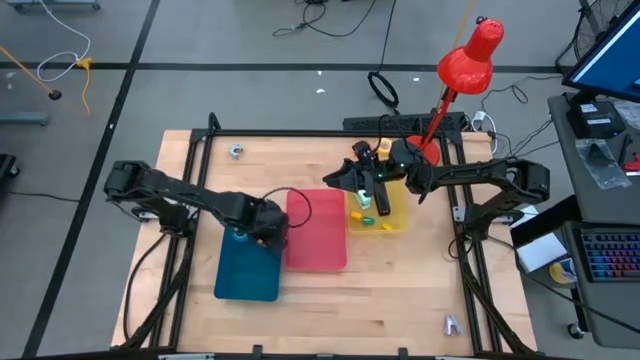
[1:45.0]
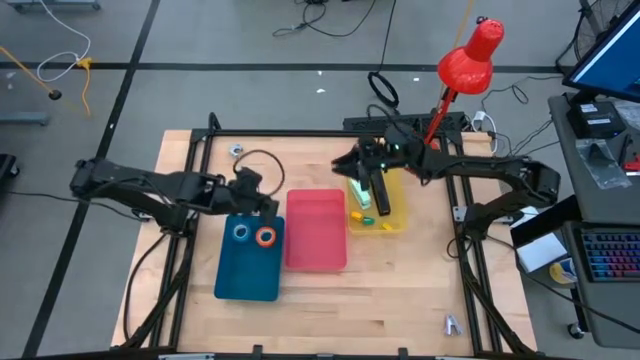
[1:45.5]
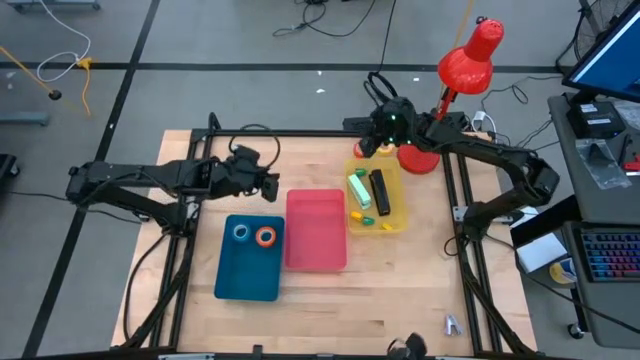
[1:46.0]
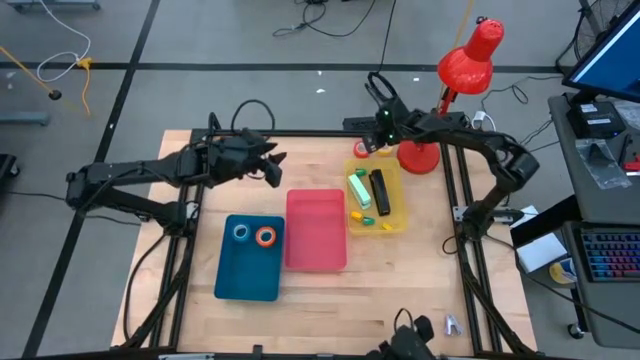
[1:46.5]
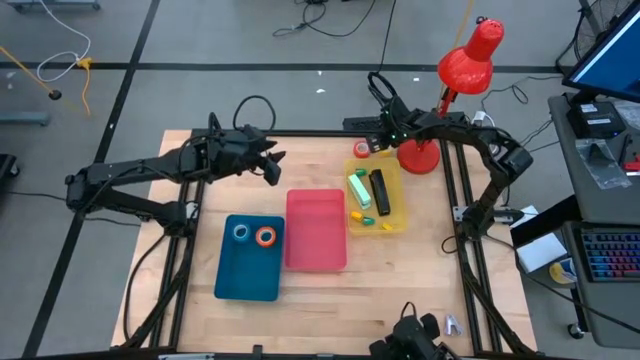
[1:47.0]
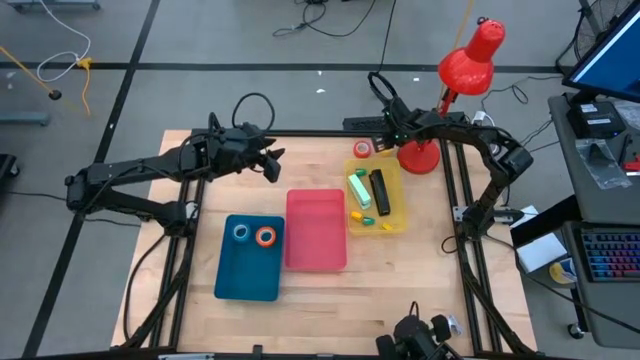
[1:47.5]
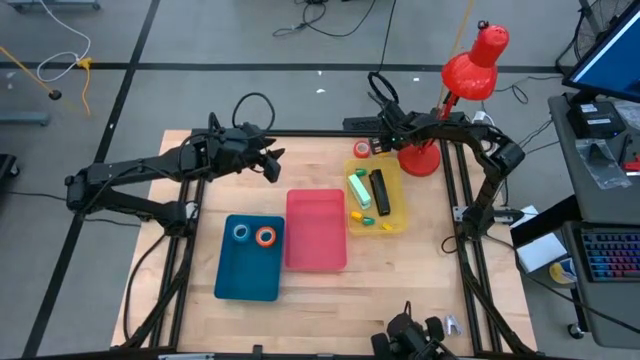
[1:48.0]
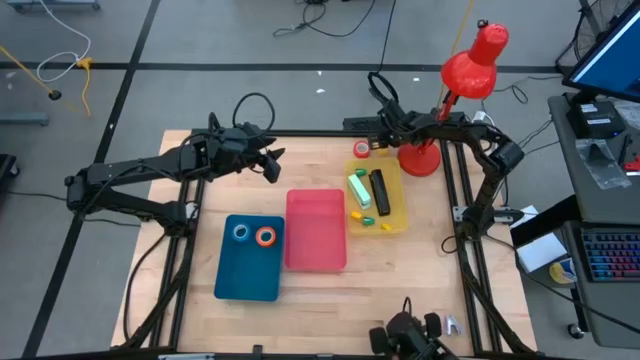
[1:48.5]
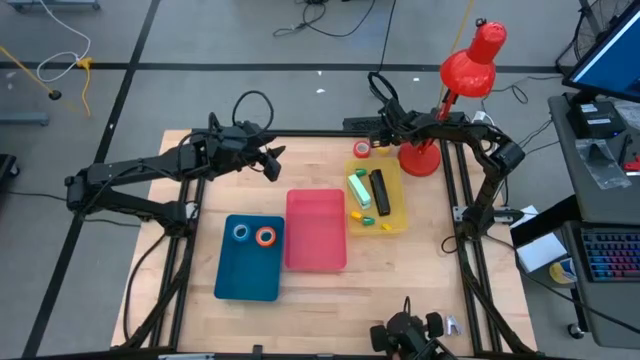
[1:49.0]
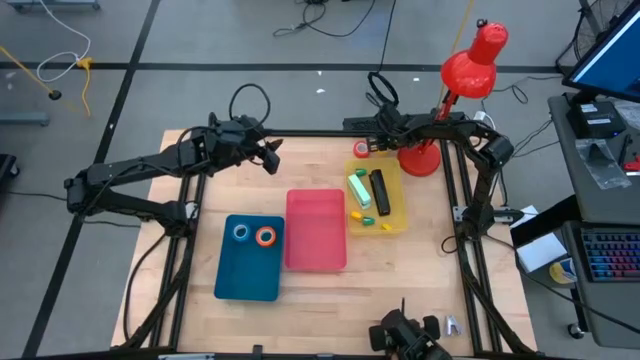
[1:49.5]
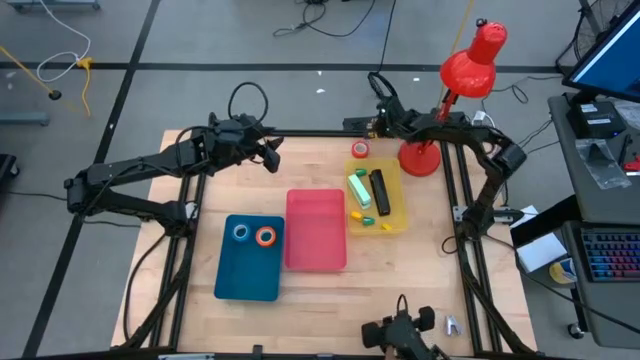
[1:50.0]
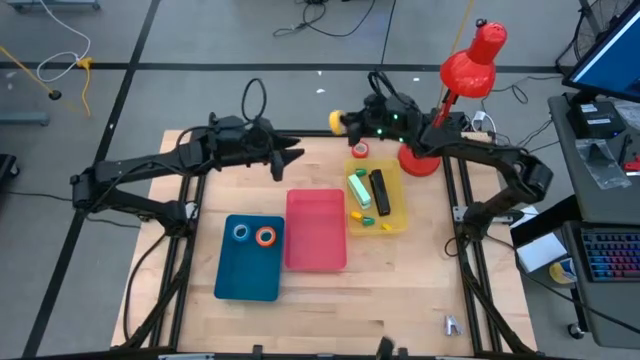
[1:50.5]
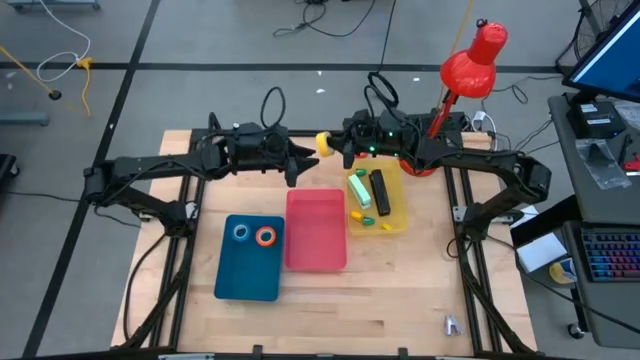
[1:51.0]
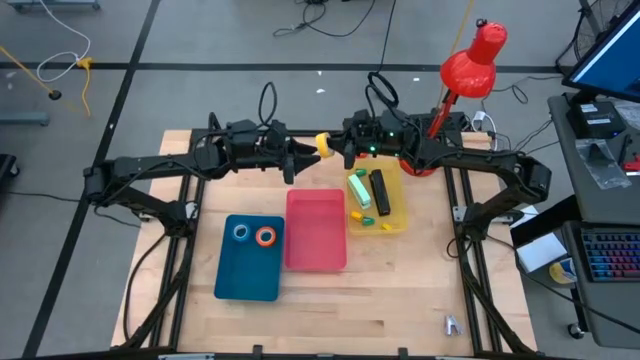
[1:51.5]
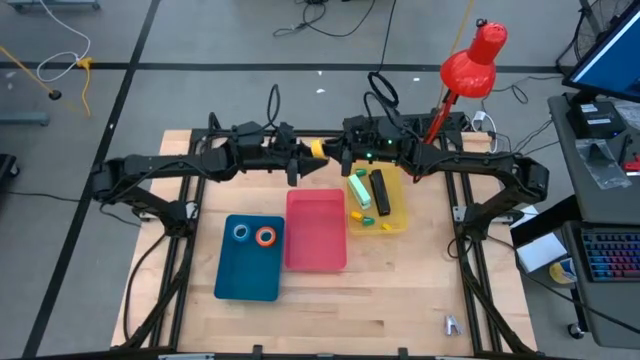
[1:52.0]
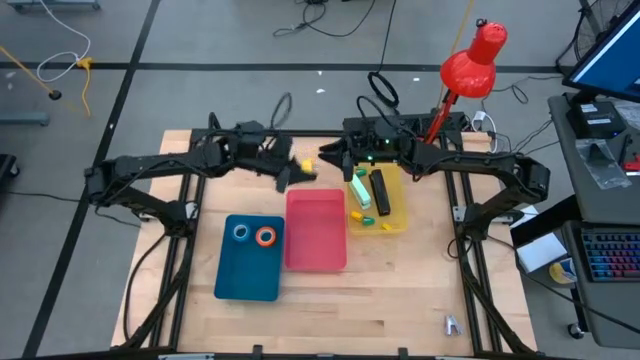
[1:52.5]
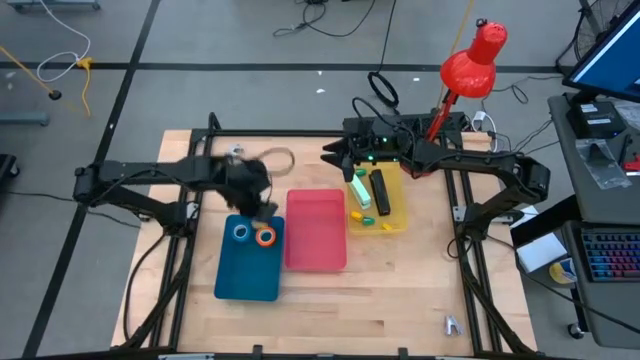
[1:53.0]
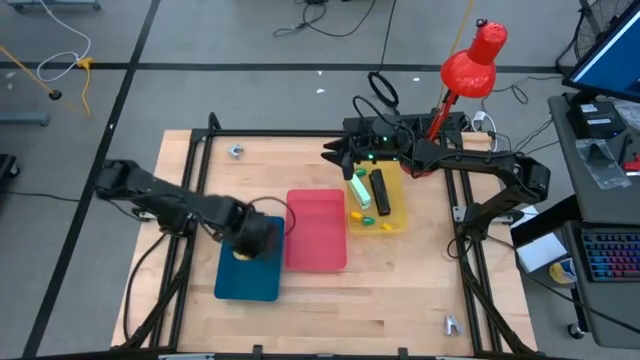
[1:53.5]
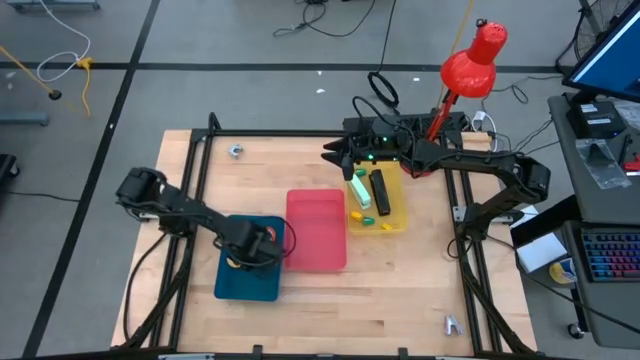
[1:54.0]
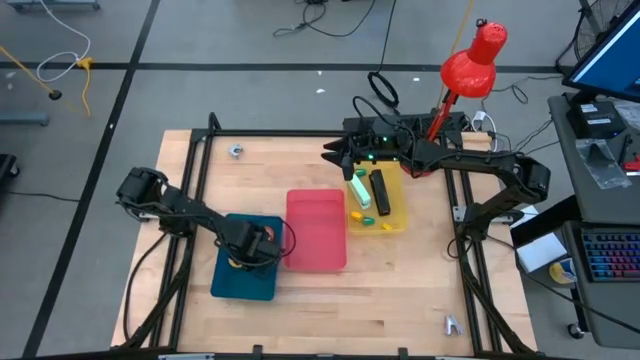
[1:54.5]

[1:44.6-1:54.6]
Task: Pick and place Stapler, Stapler remover, tape
Put the yellow tape into the blue bin

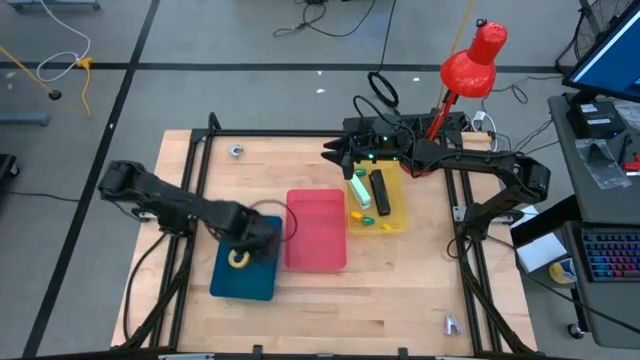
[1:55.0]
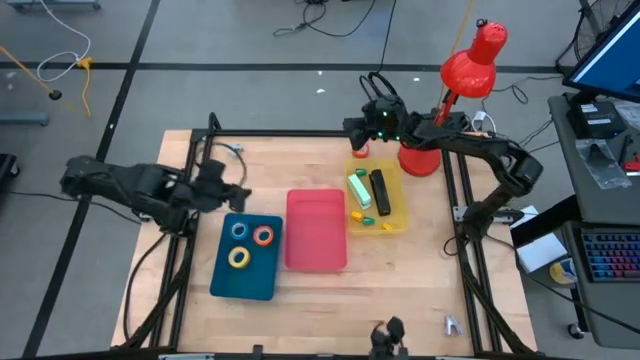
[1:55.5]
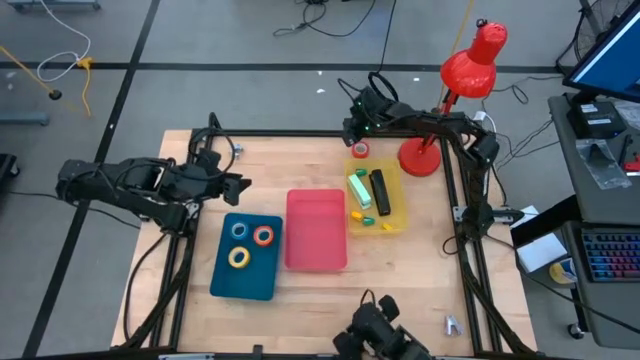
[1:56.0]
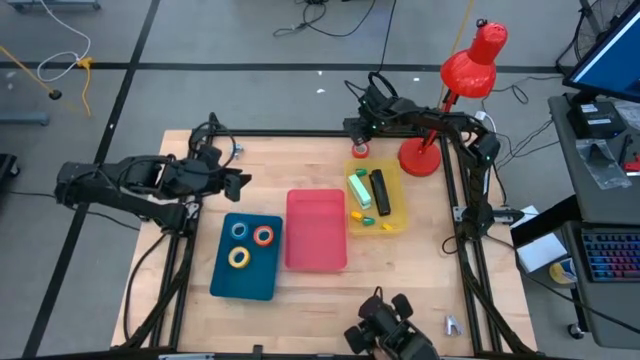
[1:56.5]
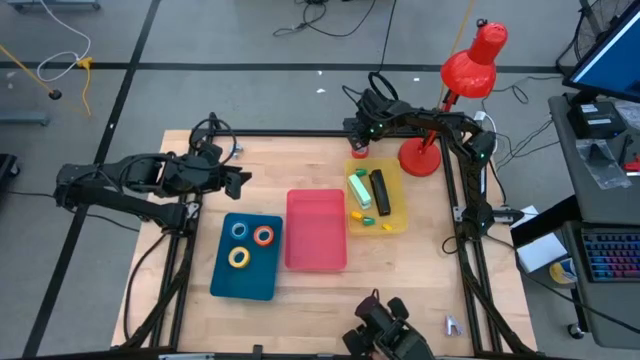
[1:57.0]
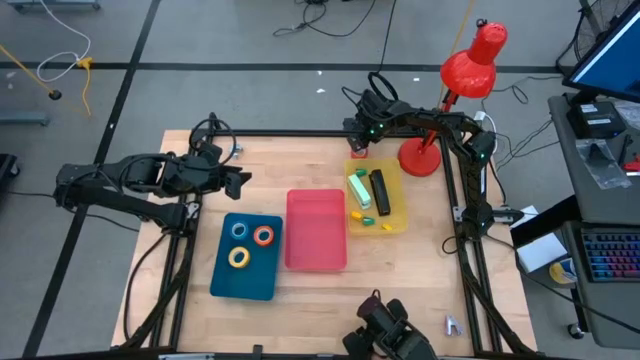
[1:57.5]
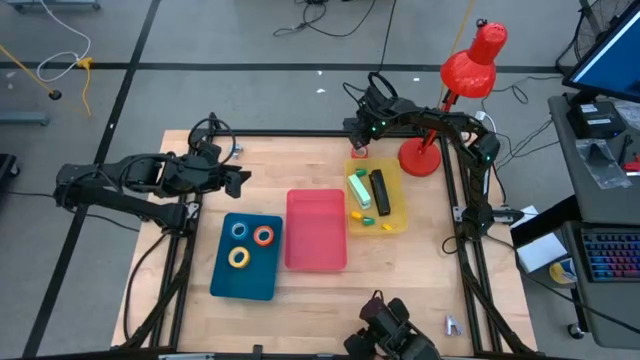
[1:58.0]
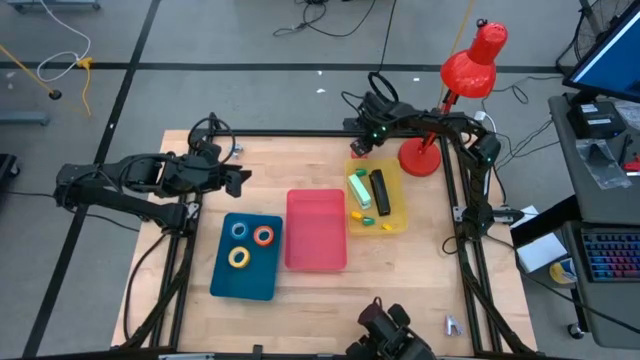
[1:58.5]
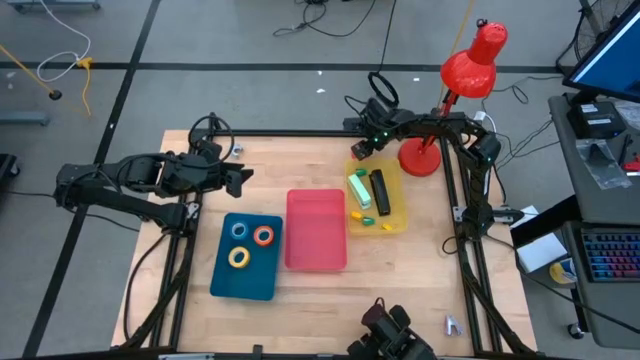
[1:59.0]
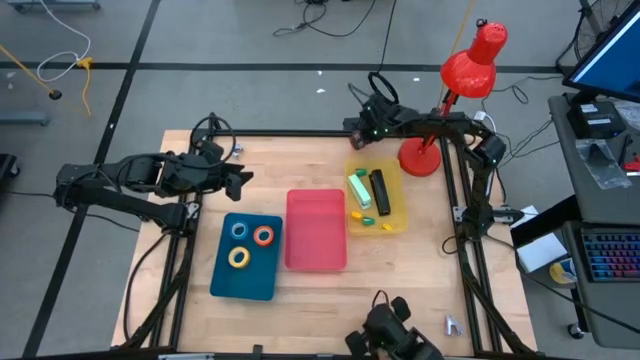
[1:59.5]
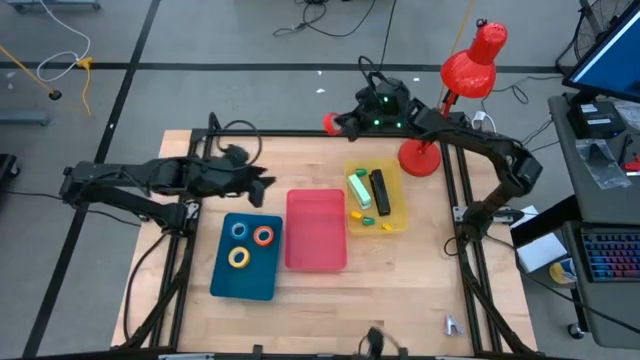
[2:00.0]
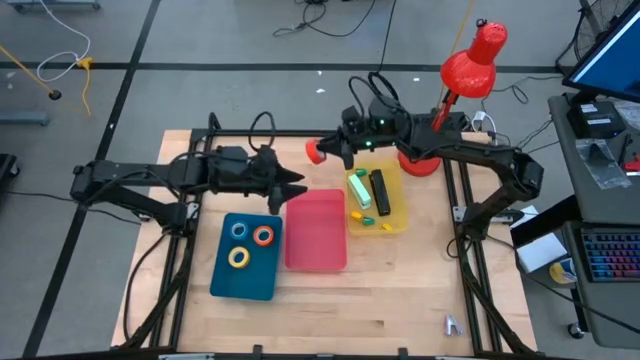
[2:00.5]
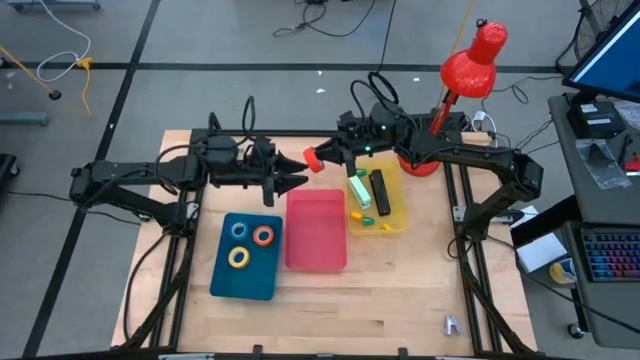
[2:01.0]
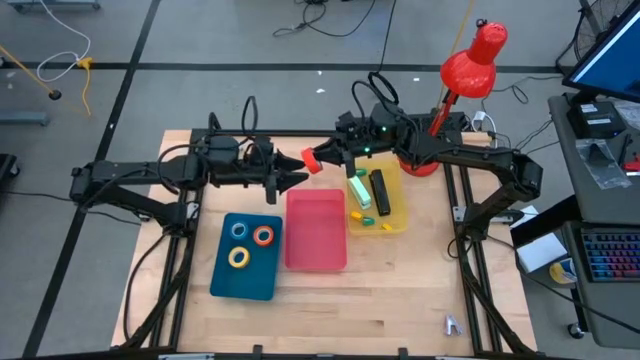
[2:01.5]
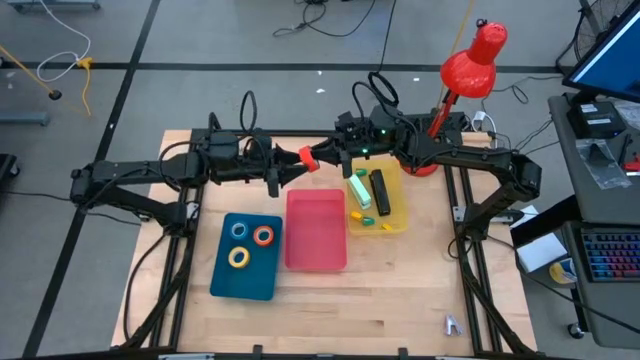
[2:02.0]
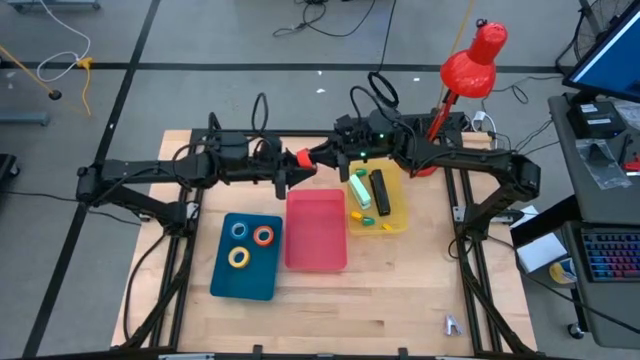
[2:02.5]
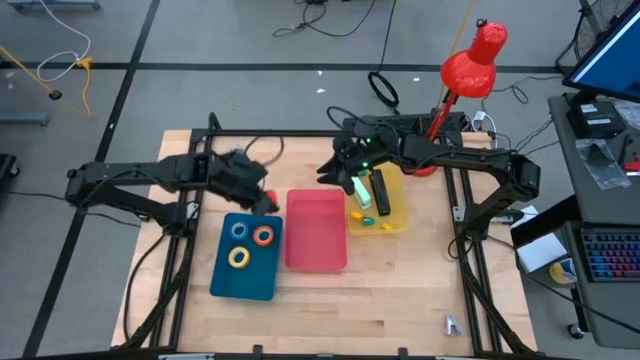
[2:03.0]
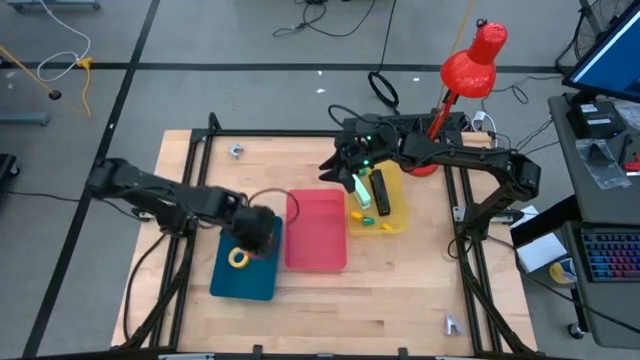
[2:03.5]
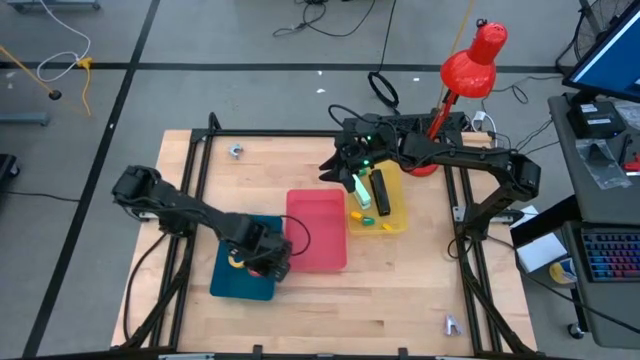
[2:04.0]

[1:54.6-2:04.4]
Put the red tape into the blue bin
